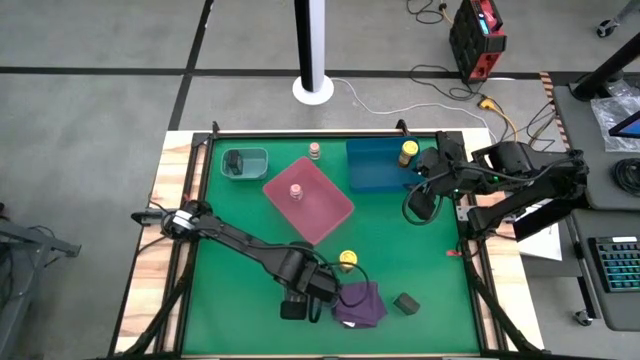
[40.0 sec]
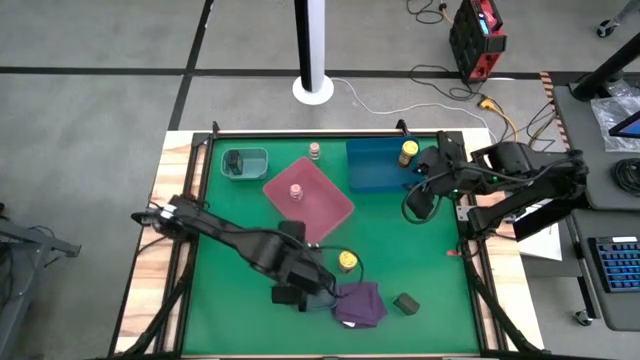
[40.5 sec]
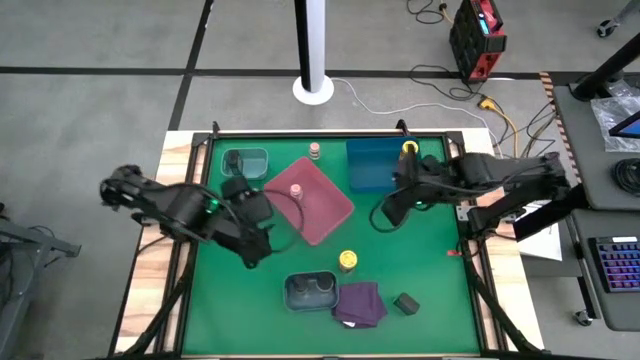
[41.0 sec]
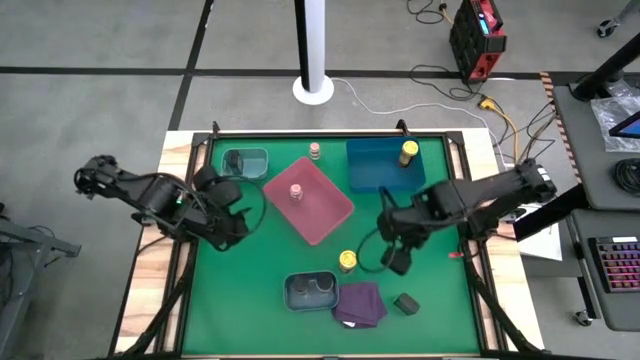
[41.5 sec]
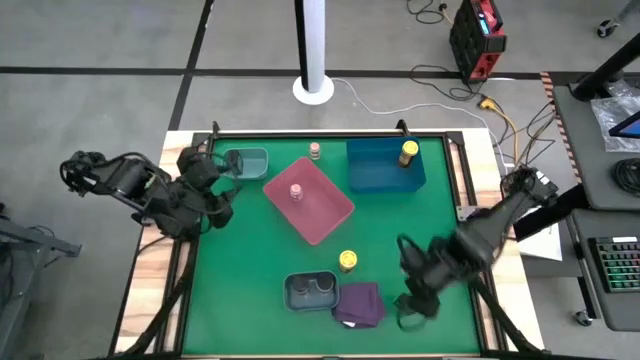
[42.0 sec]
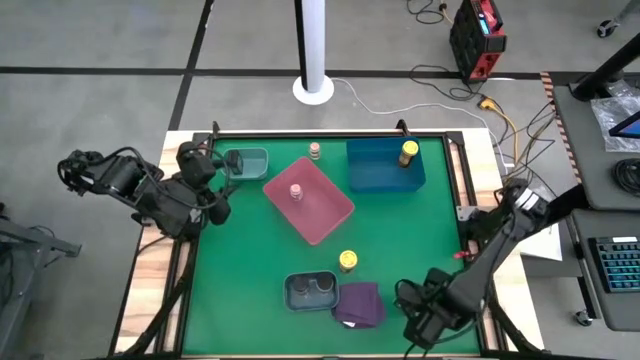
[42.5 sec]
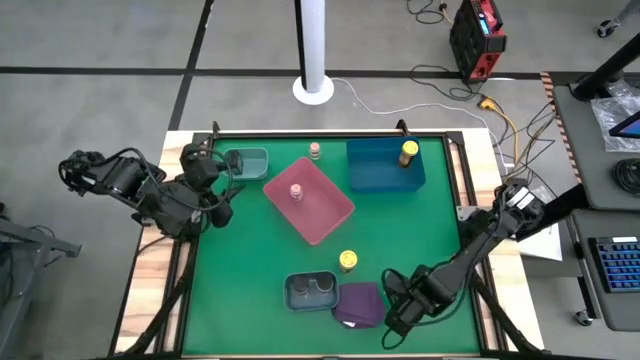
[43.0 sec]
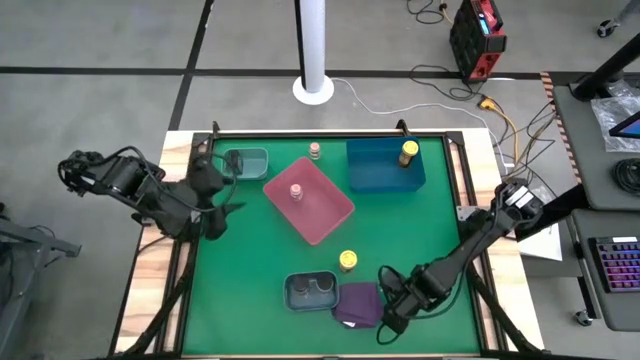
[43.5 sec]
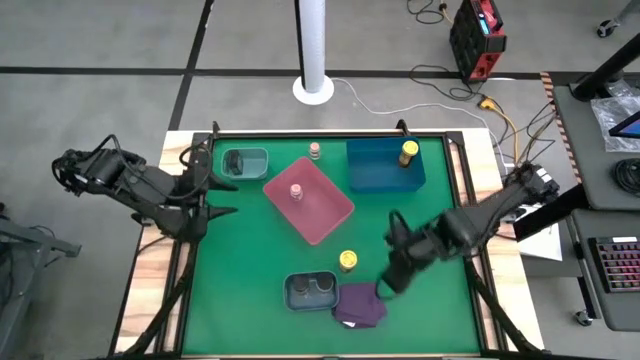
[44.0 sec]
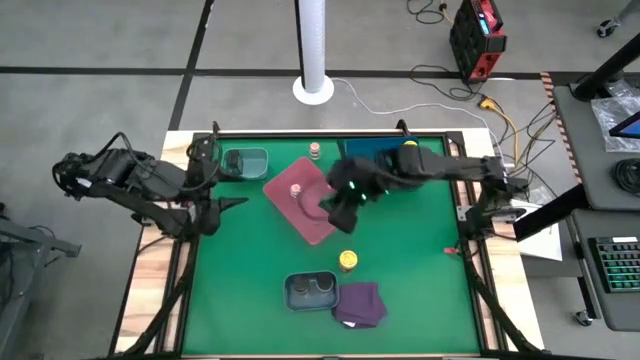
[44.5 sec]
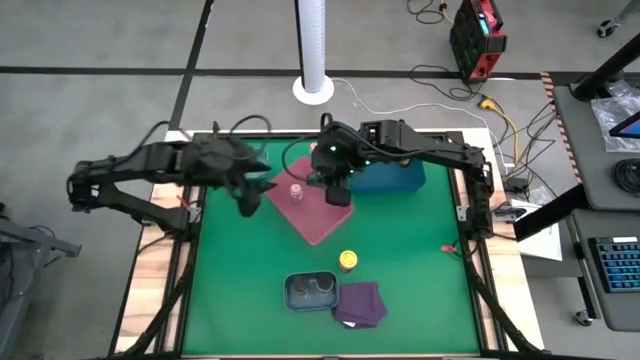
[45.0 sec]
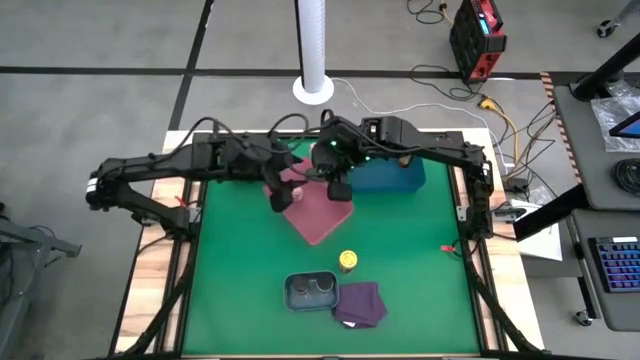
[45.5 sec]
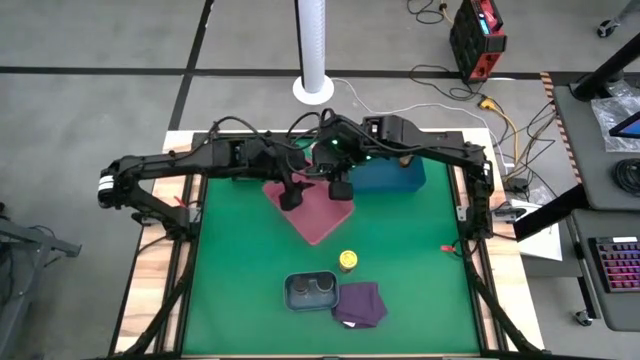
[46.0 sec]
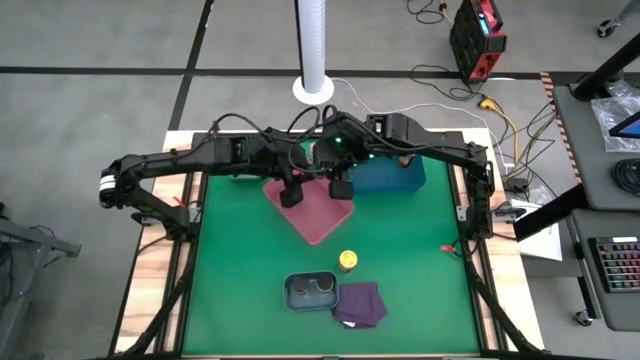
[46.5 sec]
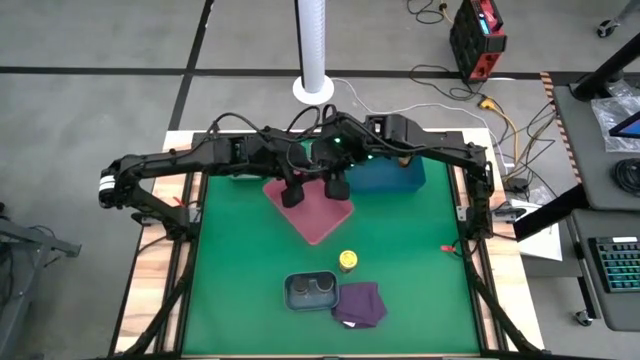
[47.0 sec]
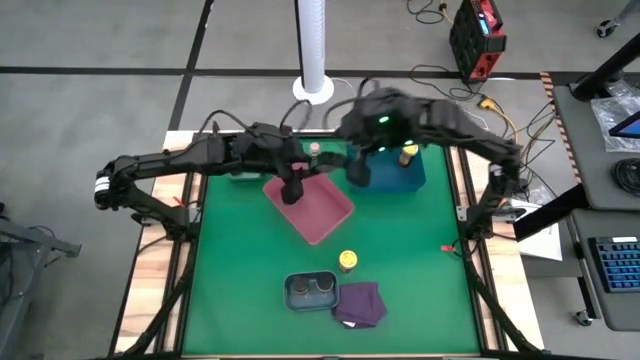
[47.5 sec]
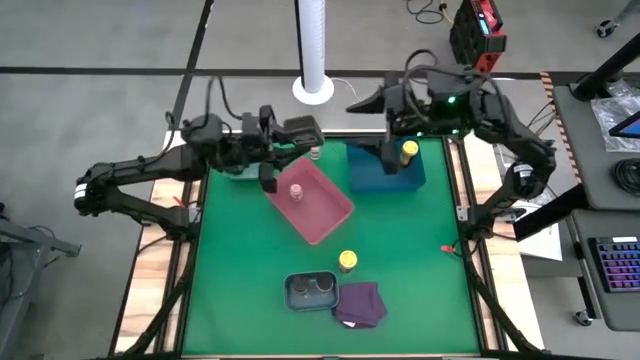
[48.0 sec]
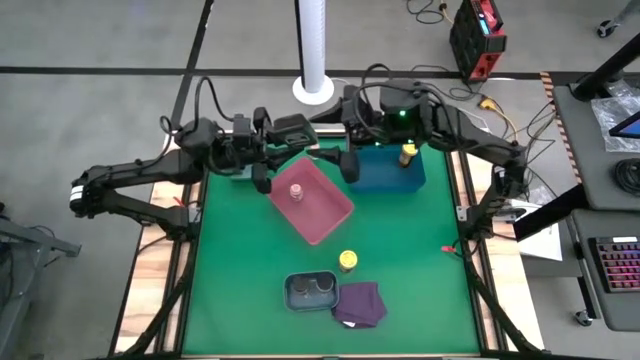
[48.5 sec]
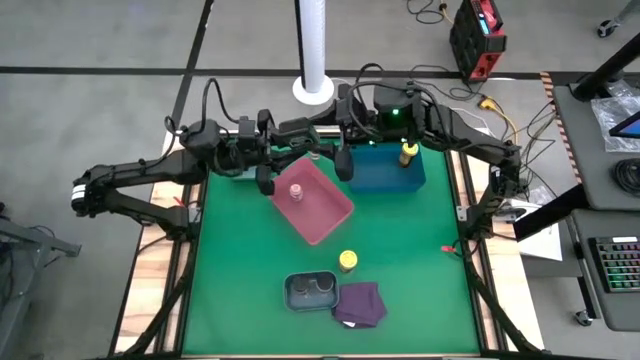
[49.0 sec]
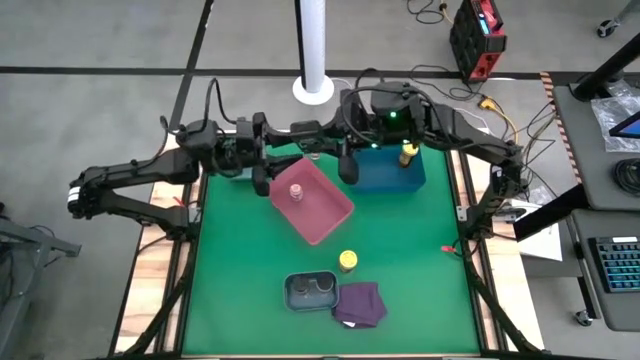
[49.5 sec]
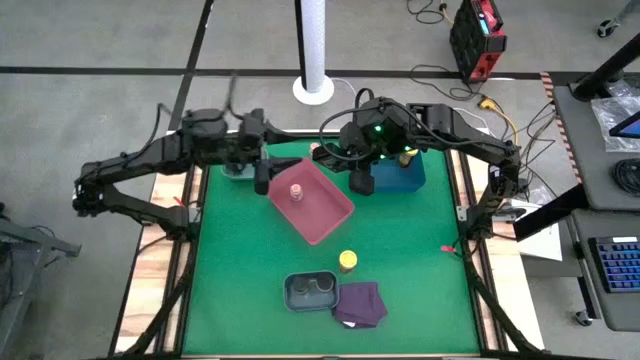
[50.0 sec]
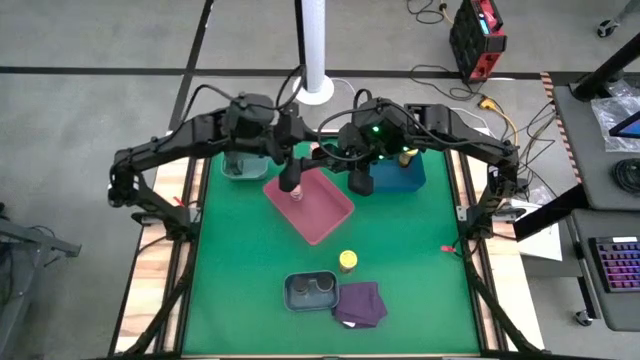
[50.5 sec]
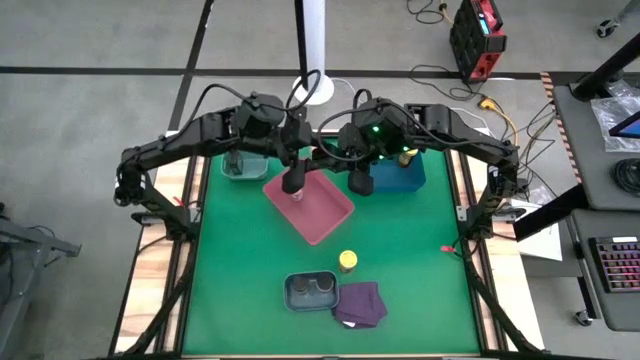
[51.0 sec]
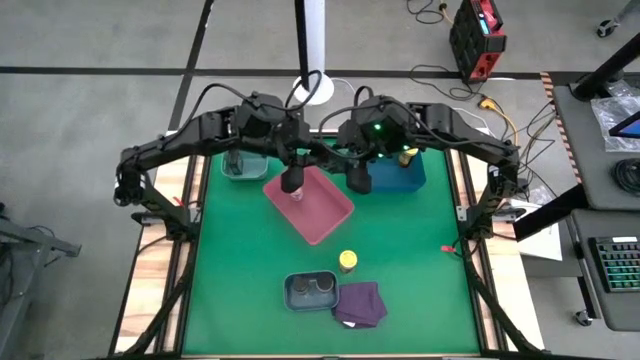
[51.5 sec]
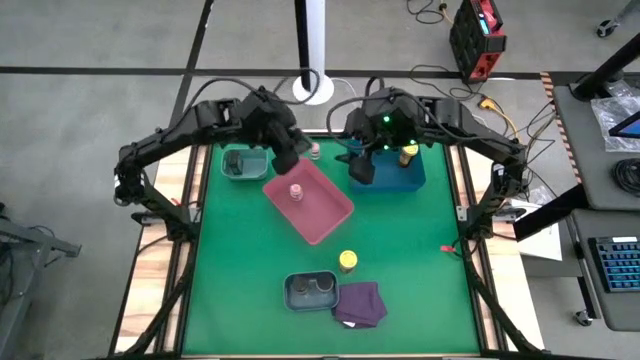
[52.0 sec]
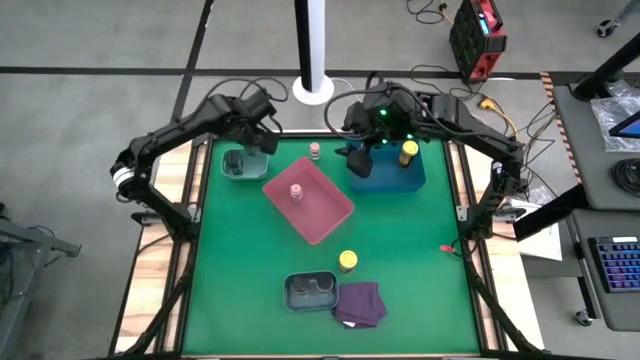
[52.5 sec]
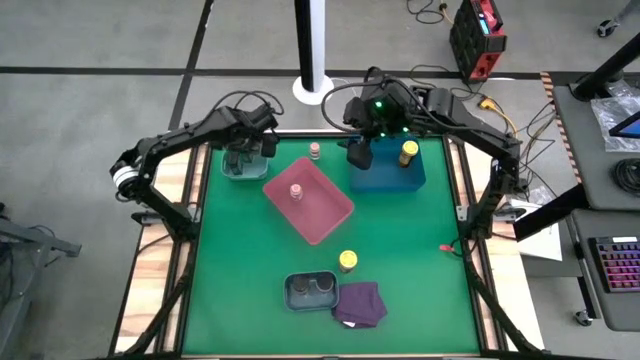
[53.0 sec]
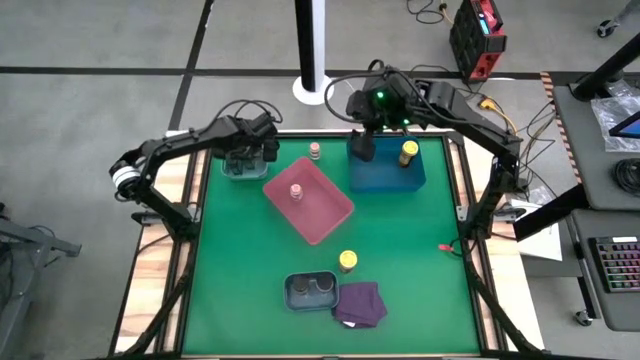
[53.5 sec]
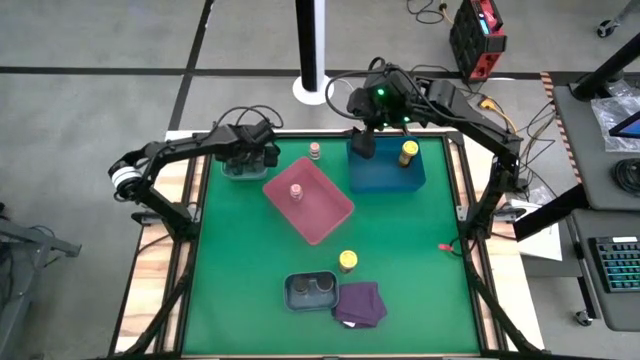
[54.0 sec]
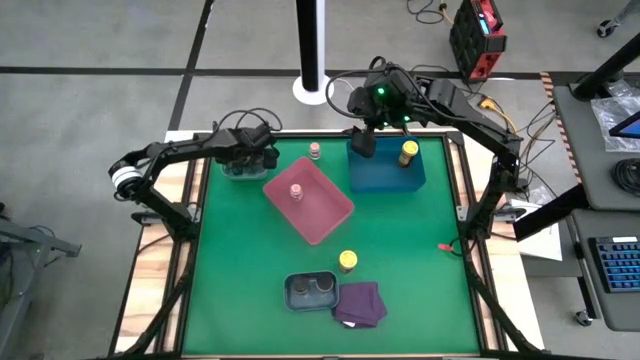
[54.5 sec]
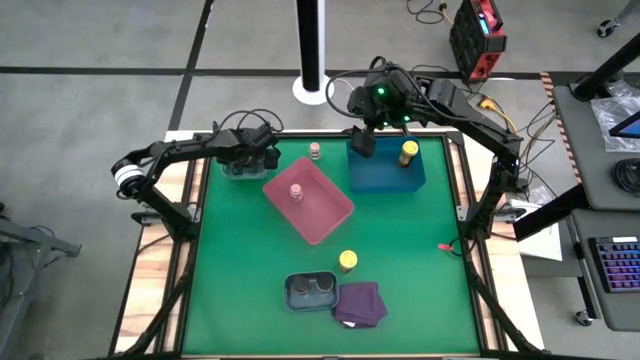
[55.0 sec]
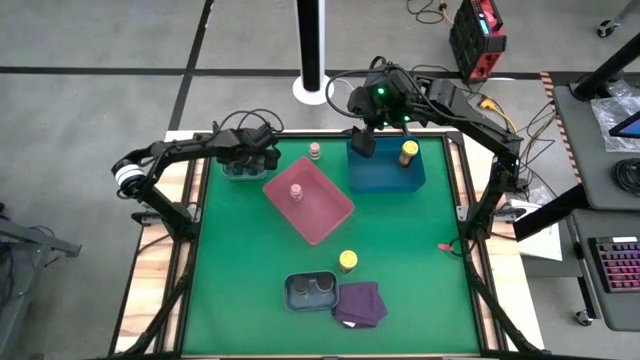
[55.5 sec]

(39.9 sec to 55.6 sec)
Task: Sort spices by type
Put the green seasoning can into the green bin

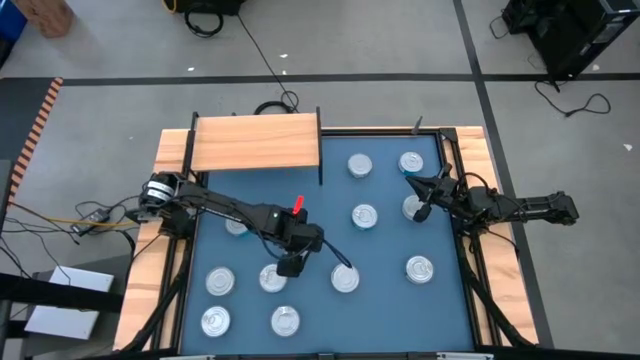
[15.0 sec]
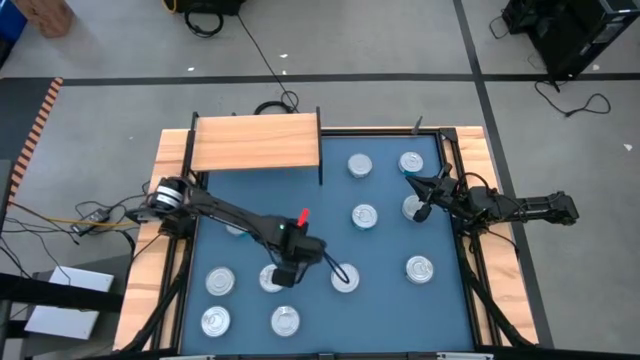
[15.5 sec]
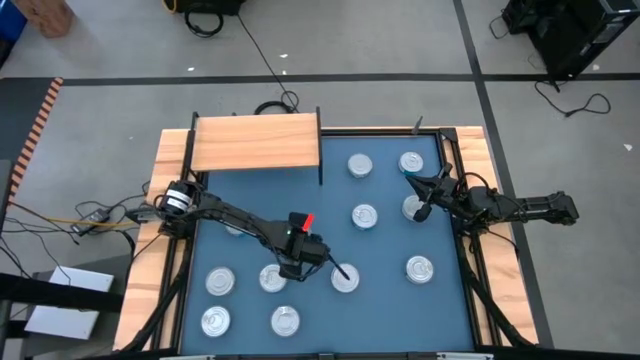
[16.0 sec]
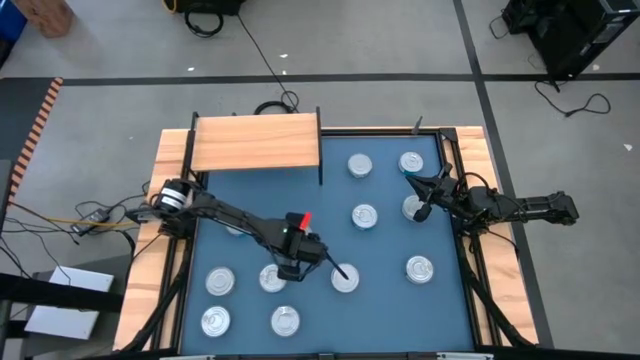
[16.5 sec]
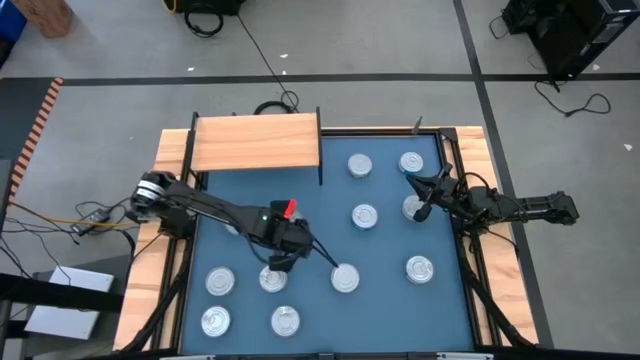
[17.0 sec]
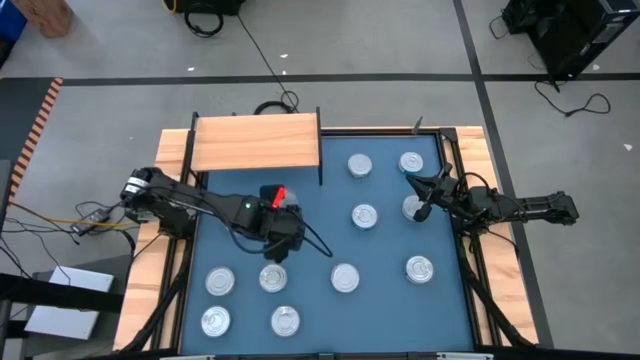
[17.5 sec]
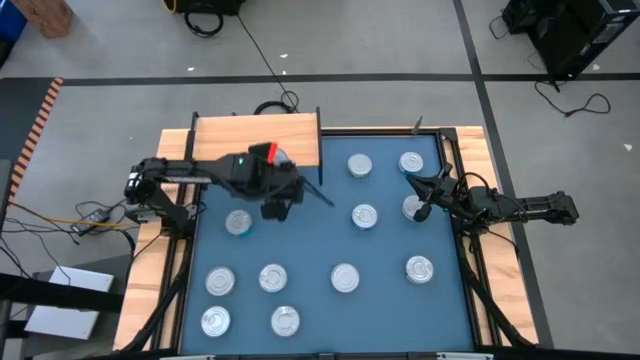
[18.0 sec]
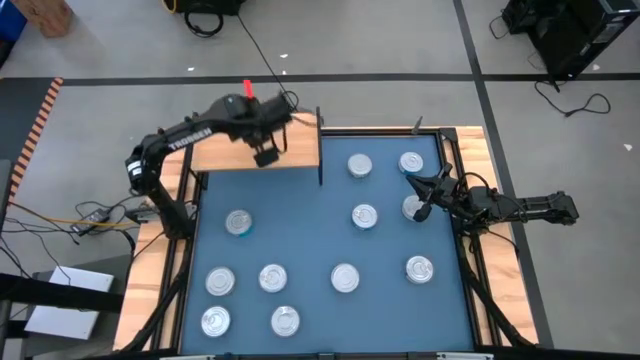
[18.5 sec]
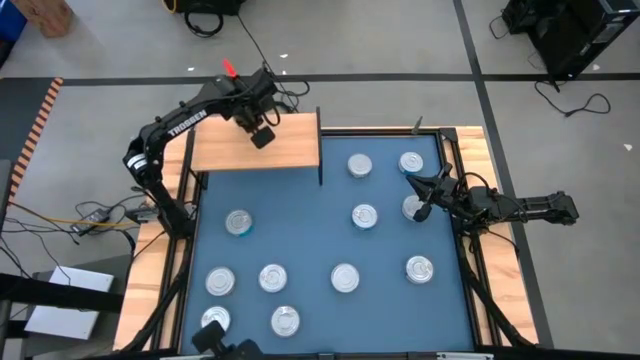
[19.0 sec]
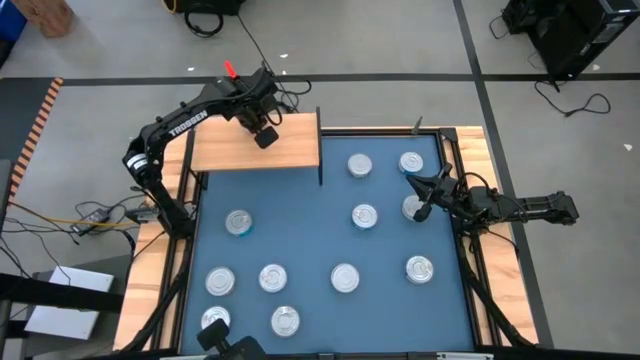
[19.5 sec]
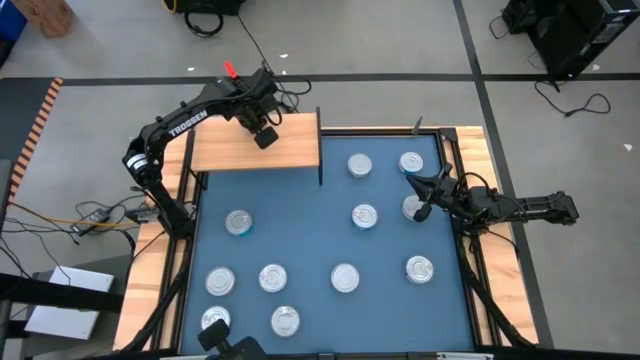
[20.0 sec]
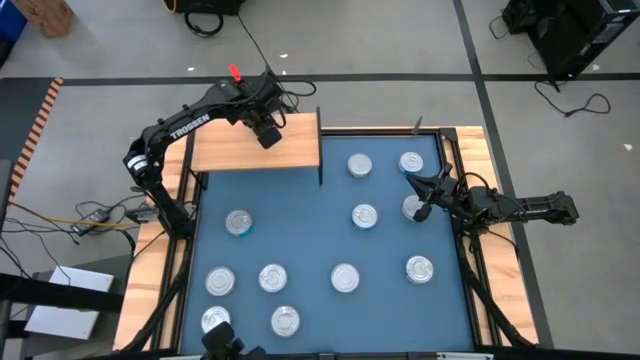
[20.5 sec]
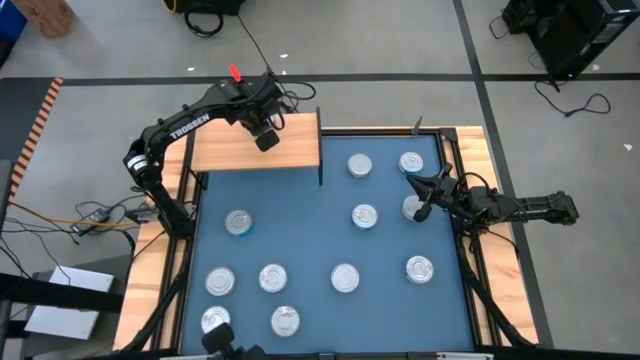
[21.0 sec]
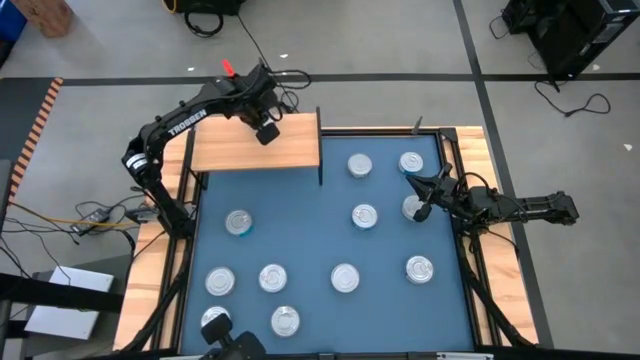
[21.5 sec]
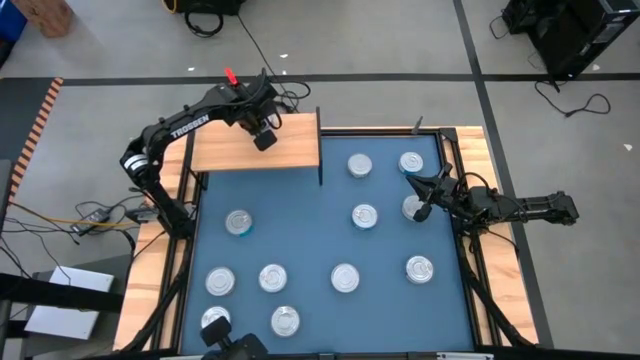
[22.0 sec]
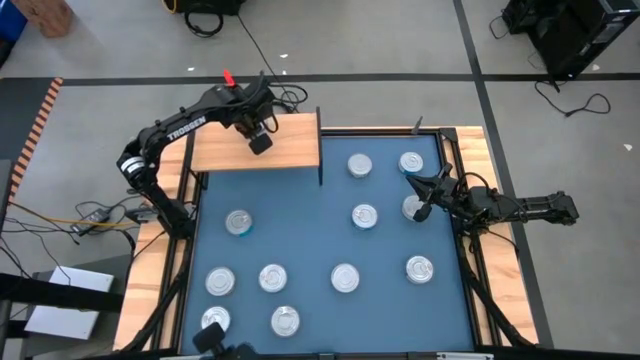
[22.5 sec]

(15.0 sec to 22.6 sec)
Task: Stack canned seafood by type on shelf
Put the blue tuna can on the shelf
